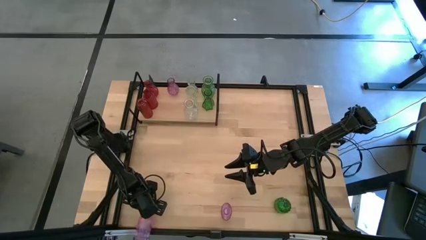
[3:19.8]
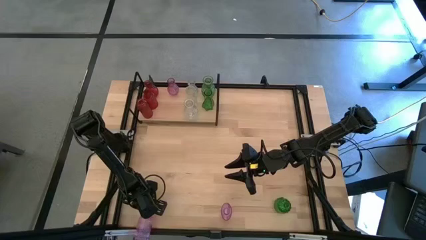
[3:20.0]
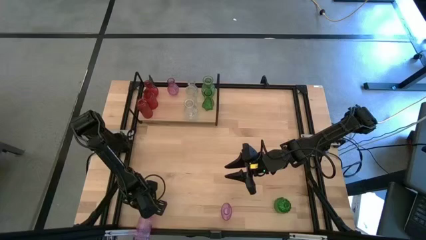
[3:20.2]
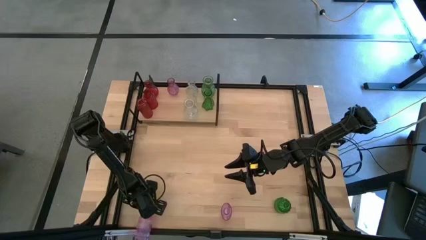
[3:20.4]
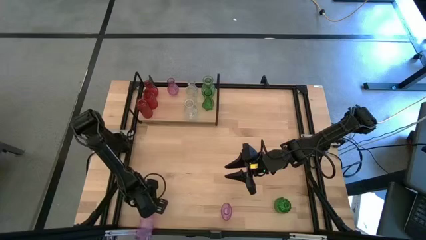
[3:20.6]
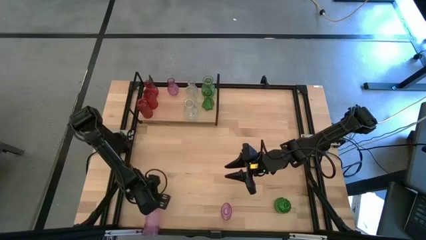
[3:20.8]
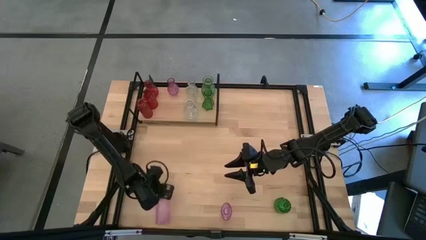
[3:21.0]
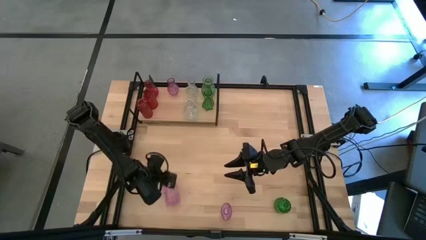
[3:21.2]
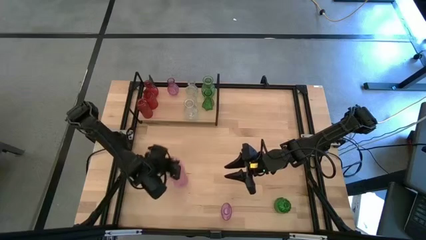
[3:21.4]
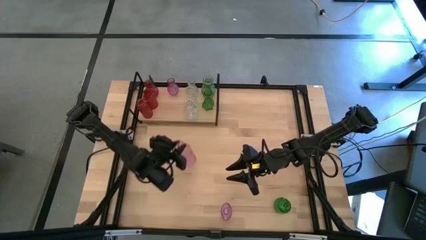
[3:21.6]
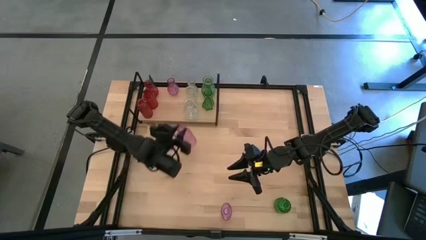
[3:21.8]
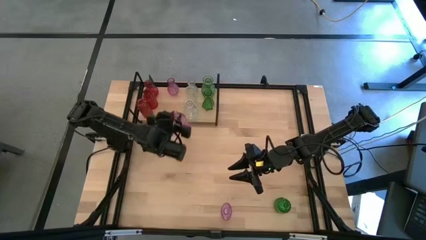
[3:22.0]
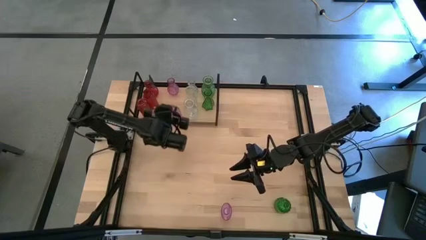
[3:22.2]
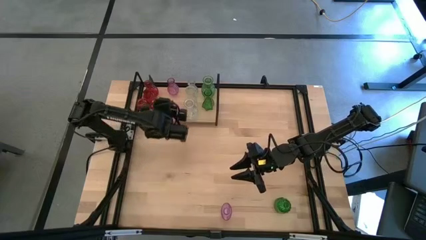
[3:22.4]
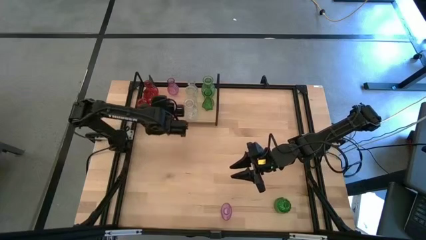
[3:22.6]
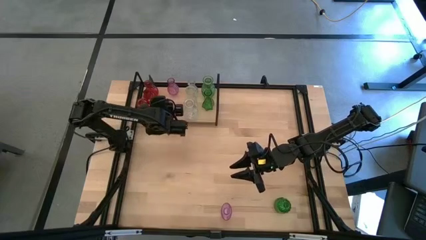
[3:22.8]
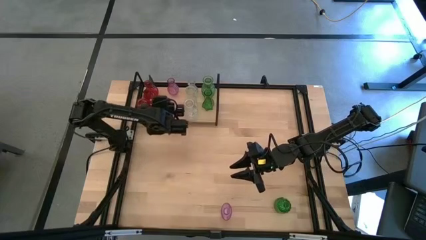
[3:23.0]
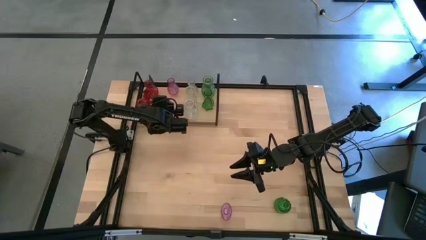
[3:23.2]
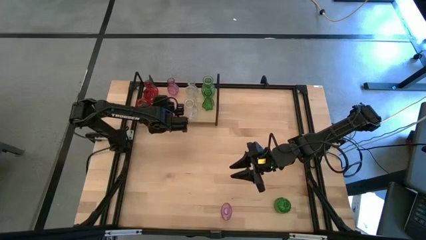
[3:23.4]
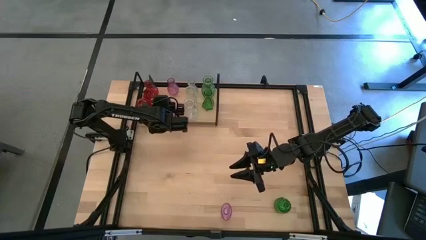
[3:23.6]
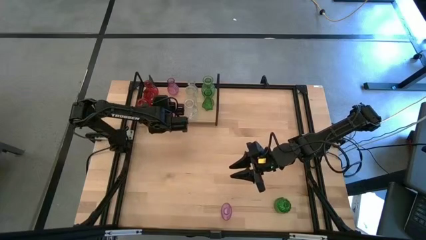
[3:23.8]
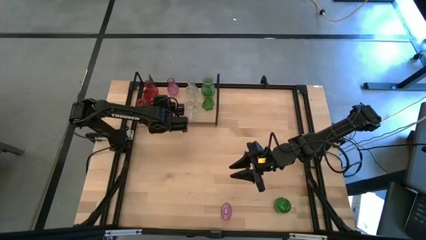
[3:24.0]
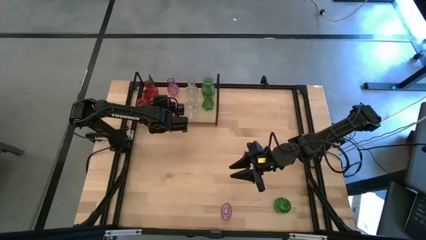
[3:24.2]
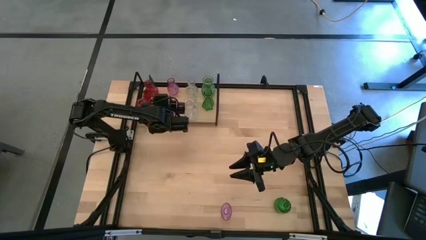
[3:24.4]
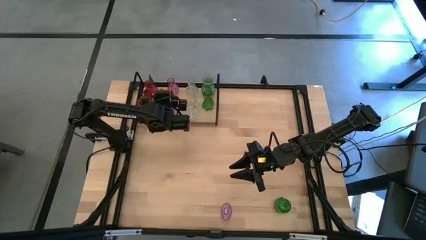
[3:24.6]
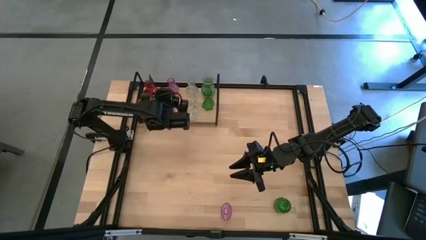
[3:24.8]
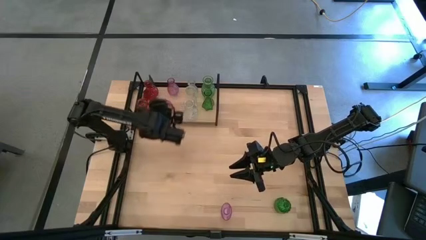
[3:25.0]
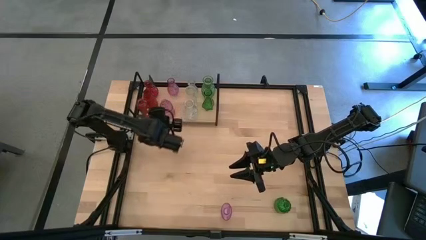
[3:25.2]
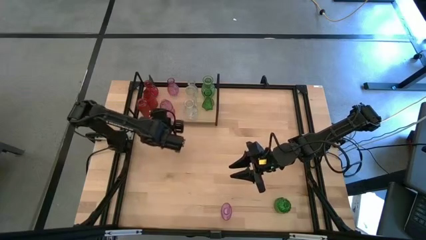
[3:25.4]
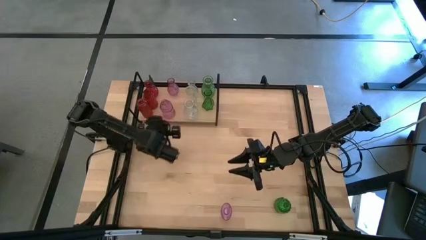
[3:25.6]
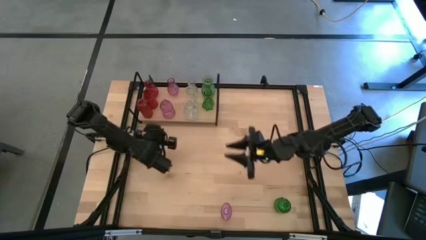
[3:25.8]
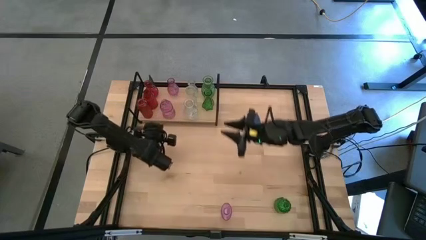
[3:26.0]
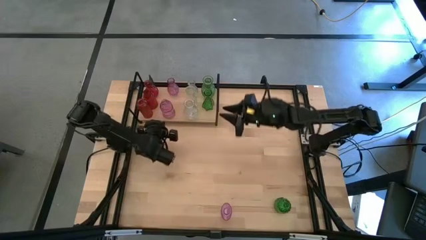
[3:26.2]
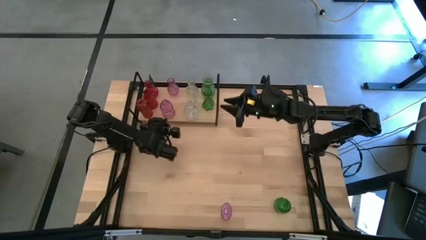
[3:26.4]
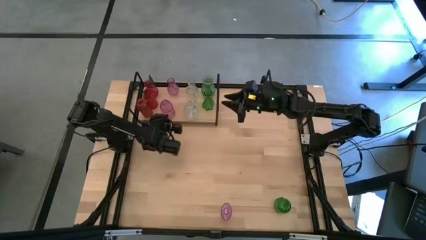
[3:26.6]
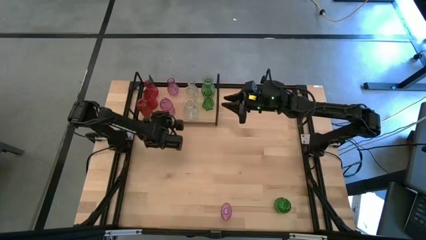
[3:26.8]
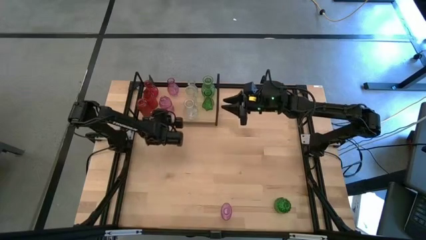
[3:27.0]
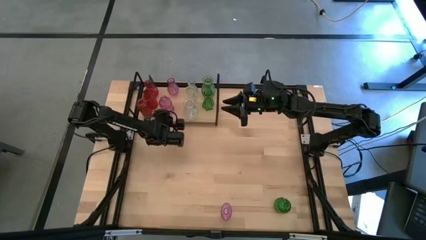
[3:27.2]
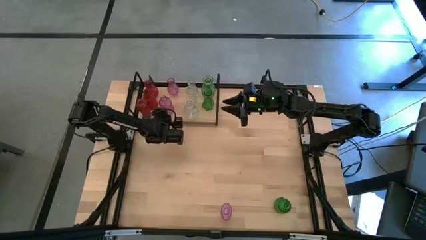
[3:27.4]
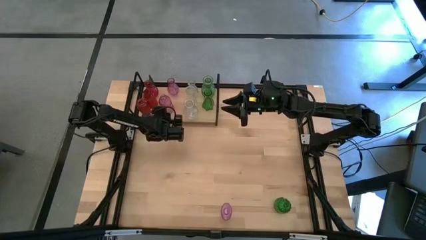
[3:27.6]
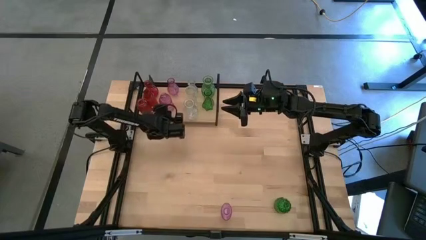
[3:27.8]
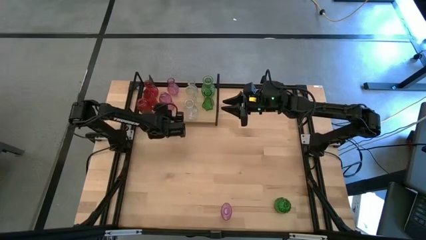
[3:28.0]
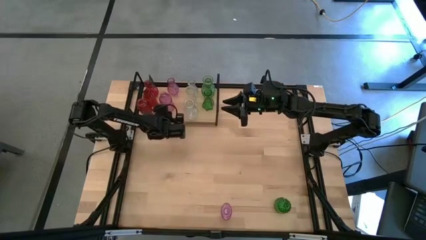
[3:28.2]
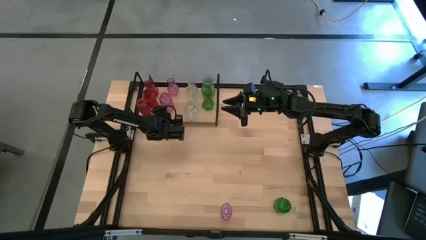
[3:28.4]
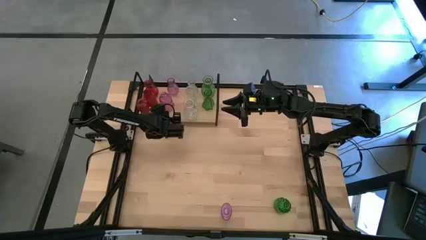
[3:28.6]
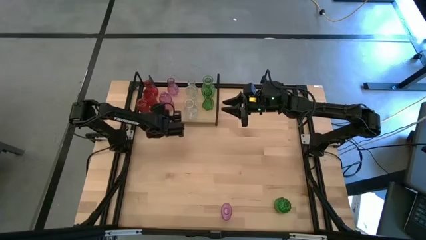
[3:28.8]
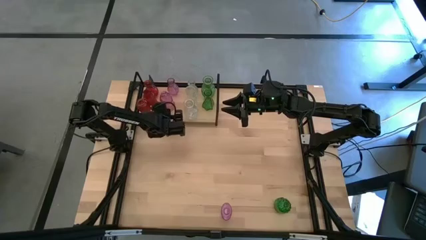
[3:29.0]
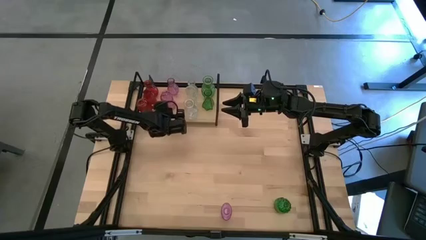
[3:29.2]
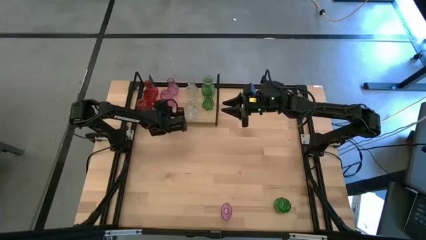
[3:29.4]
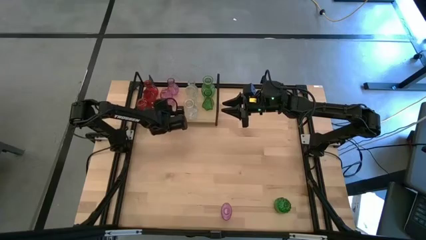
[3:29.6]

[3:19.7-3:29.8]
Task: sort vases onto shelf
Put the left purple vase on the shelf aligned with the other purple vase

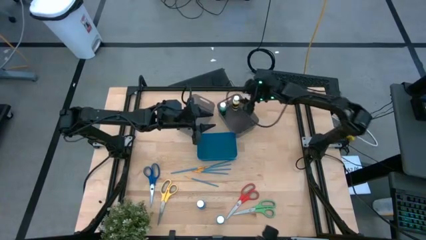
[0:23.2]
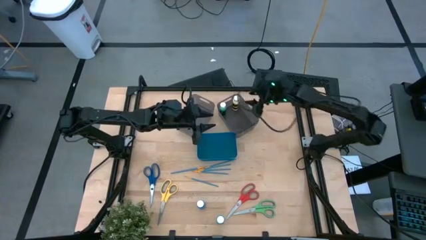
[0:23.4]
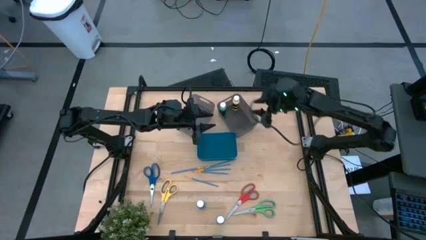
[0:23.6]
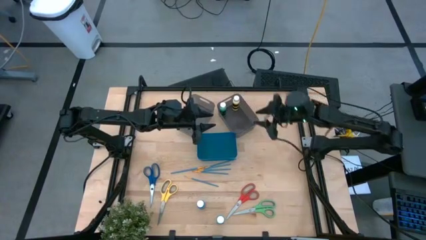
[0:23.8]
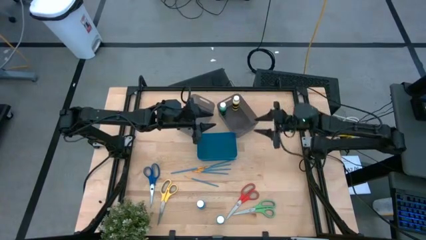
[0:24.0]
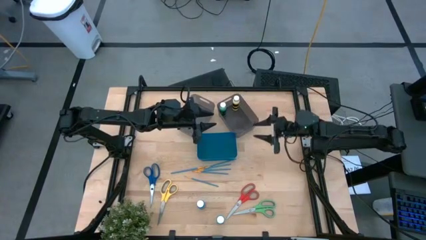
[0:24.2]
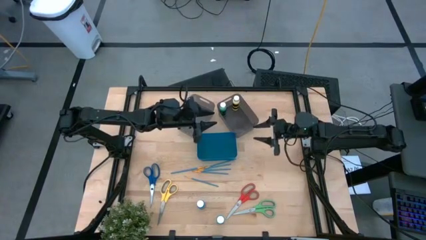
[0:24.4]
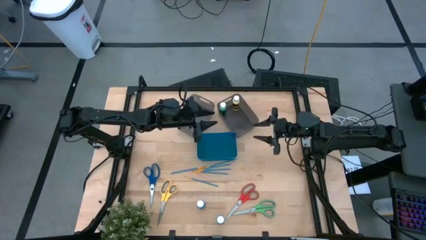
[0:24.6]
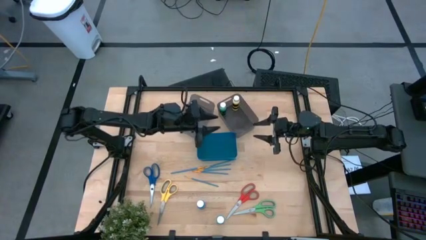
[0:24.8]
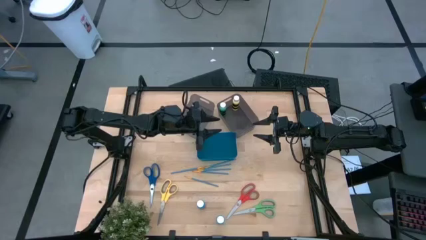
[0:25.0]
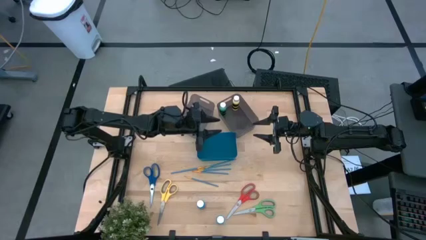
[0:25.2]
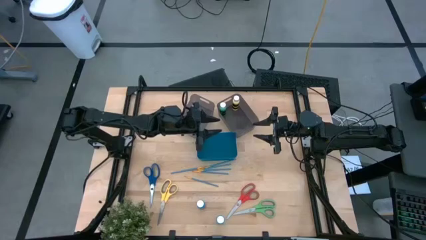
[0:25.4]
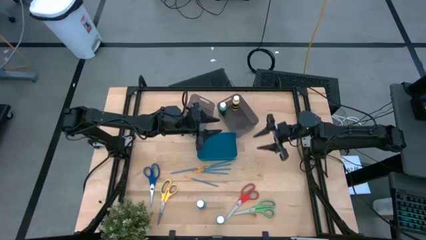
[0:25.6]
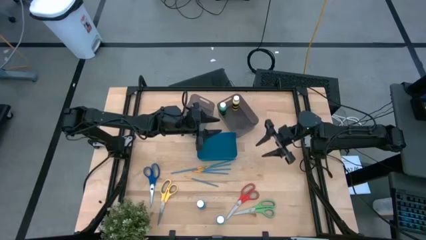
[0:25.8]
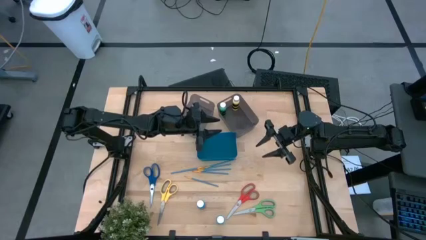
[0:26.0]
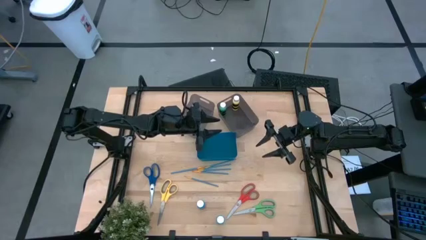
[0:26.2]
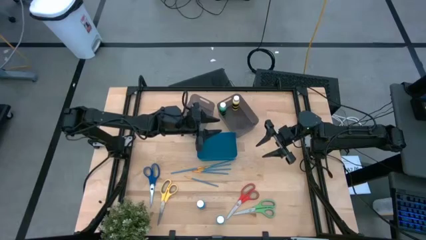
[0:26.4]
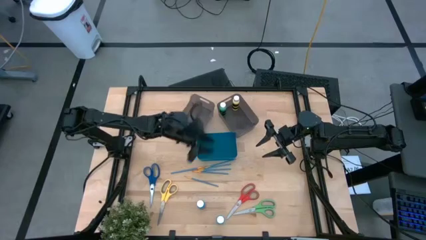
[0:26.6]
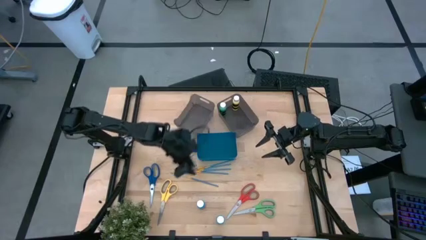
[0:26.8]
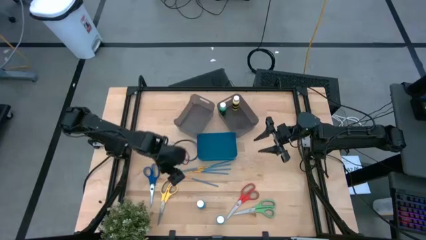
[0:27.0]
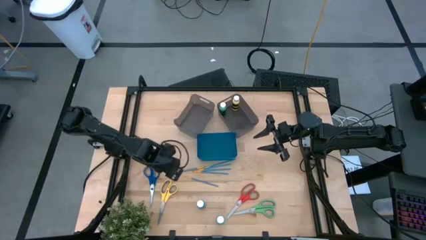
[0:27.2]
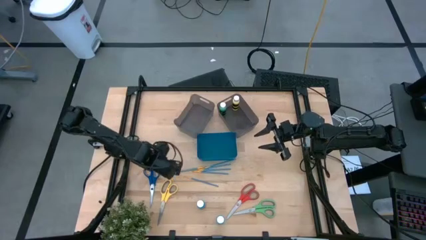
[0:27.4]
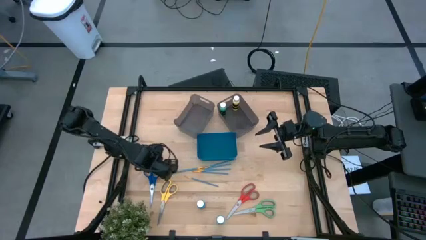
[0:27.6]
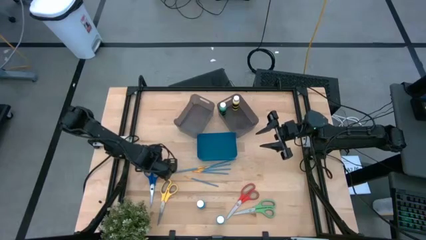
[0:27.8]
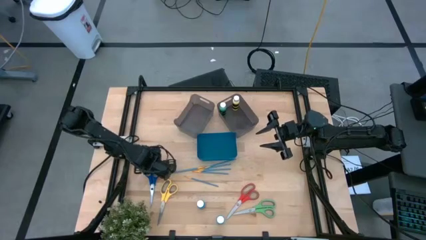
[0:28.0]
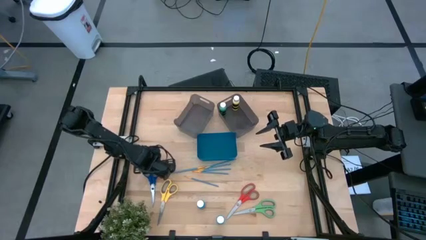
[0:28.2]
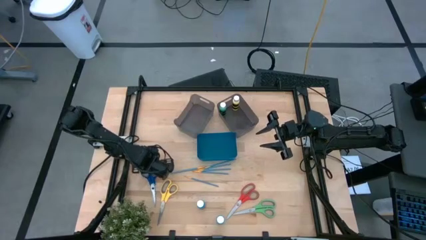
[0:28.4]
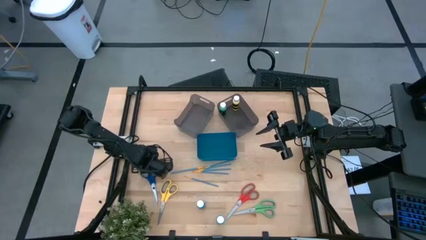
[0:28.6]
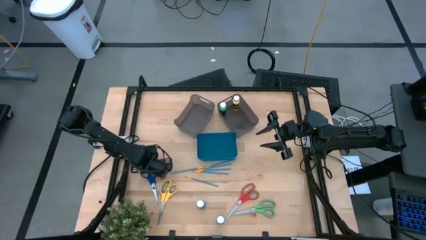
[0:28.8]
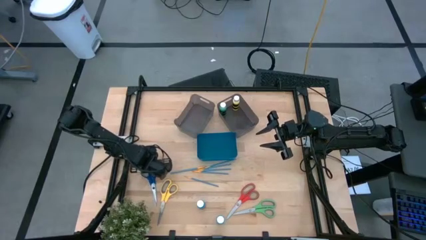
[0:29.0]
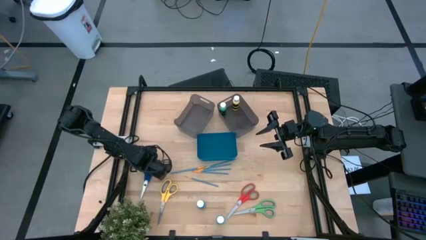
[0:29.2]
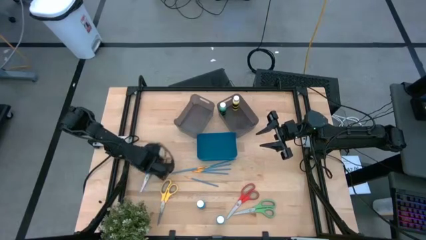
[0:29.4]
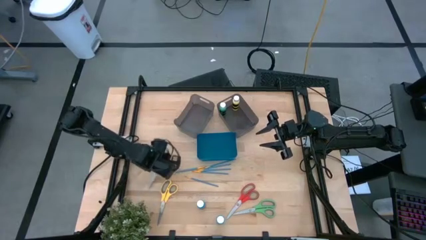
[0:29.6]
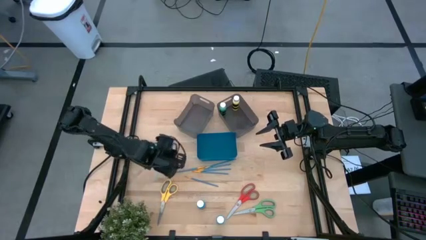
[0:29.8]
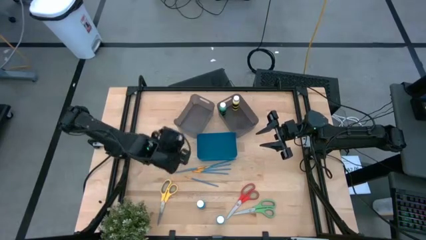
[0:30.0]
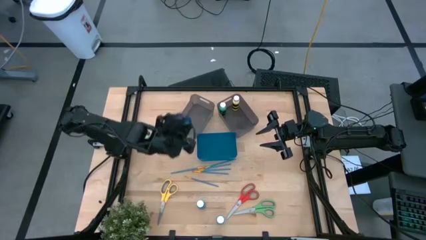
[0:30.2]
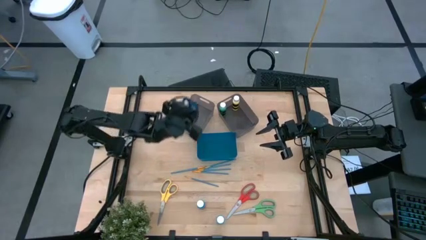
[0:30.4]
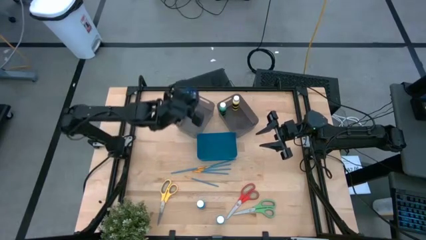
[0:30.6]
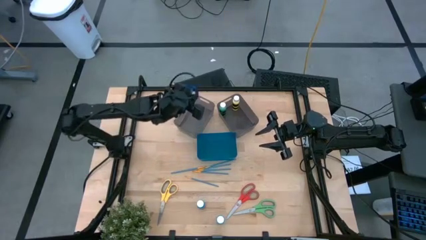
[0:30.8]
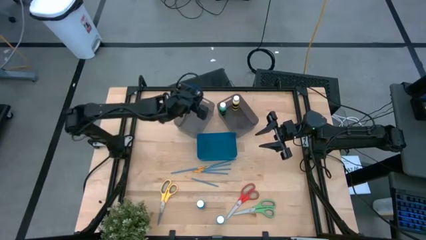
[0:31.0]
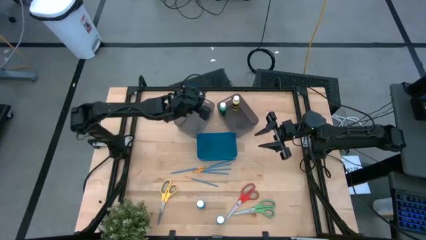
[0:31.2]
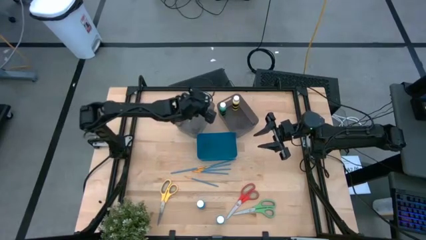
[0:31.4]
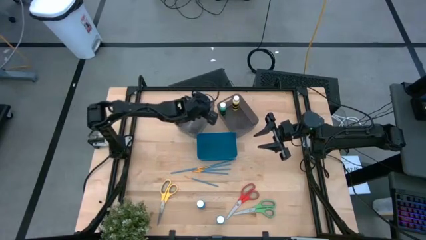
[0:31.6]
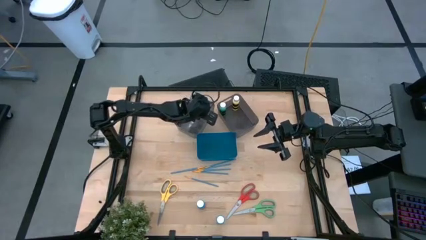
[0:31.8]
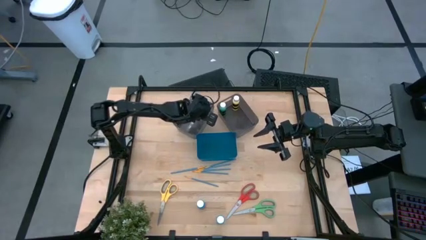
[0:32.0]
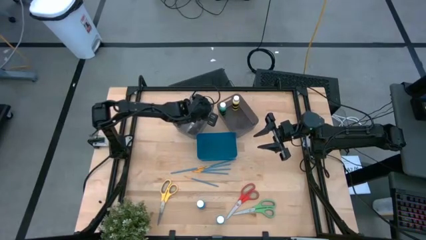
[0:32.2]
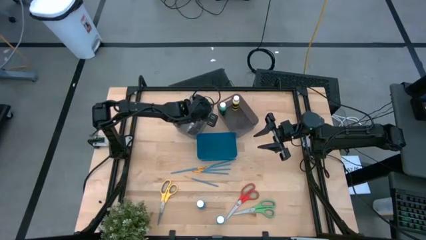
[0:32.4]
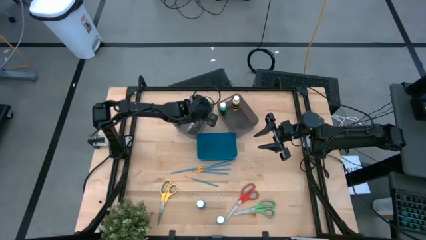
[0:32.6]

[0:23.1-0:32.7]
Task: Pick & Place Paint Supplies
Put the blue scissors into the left black bin
